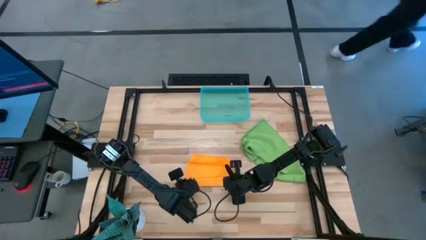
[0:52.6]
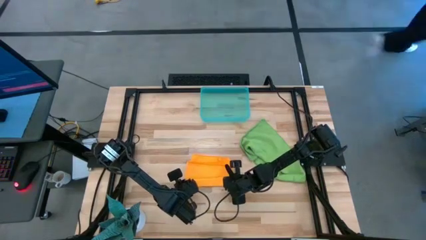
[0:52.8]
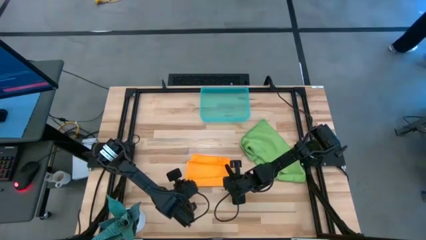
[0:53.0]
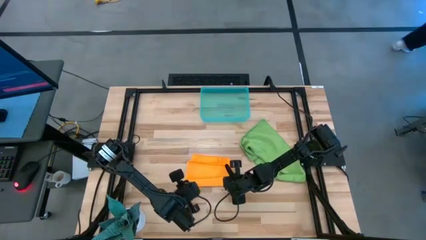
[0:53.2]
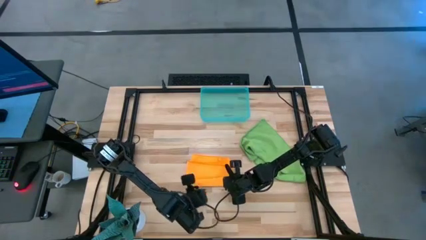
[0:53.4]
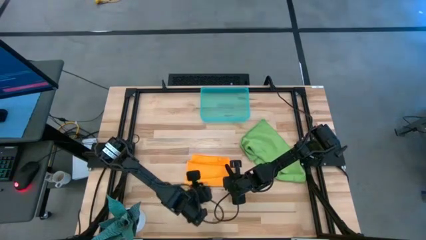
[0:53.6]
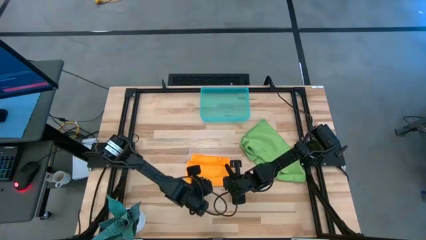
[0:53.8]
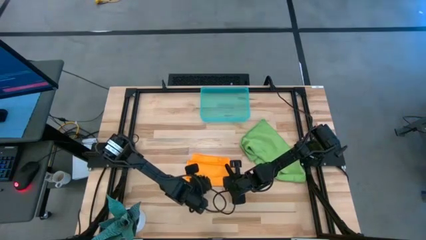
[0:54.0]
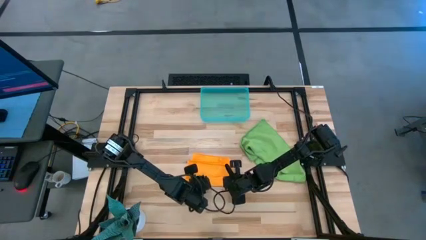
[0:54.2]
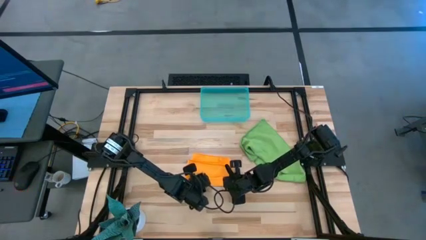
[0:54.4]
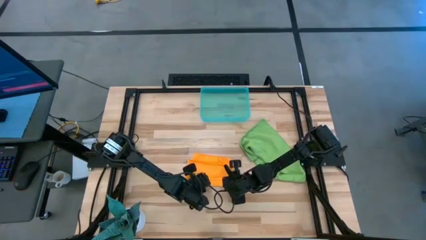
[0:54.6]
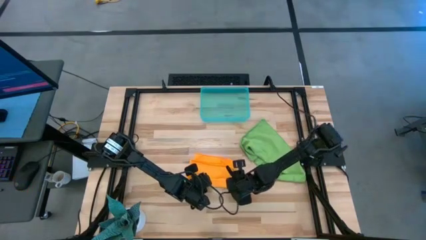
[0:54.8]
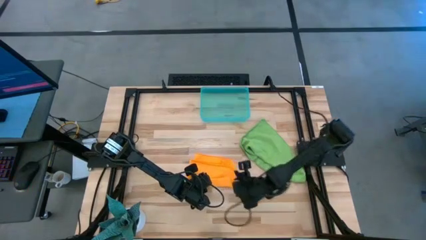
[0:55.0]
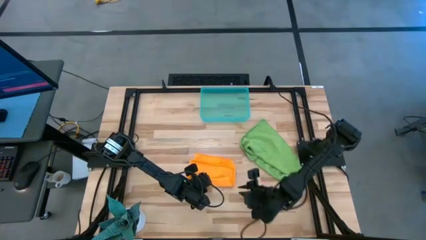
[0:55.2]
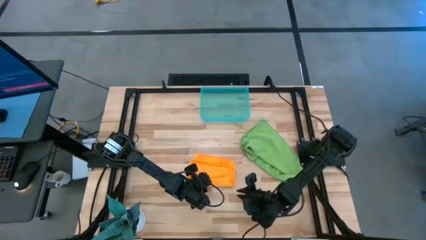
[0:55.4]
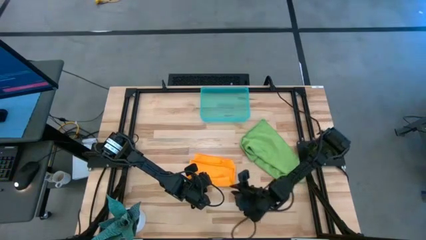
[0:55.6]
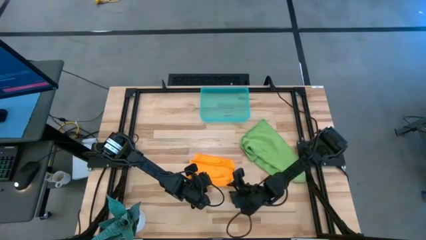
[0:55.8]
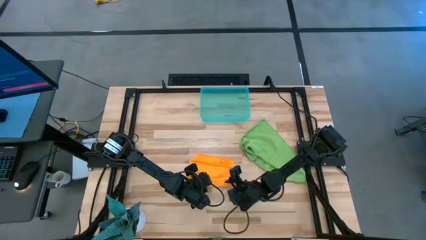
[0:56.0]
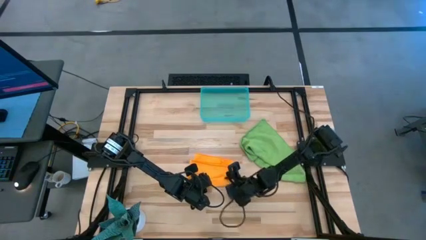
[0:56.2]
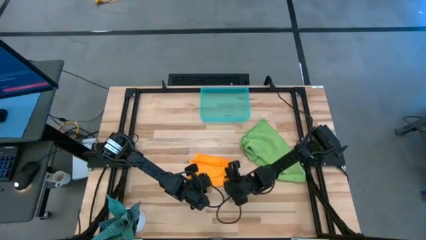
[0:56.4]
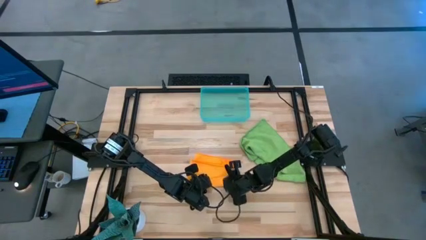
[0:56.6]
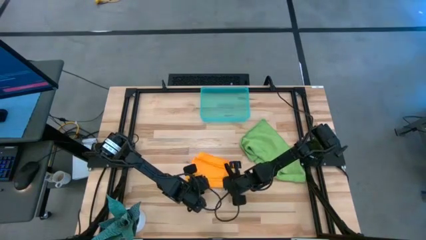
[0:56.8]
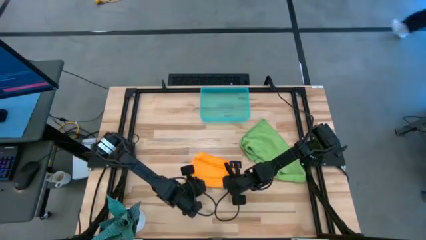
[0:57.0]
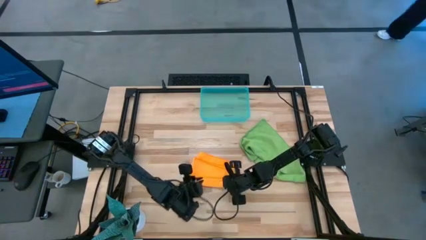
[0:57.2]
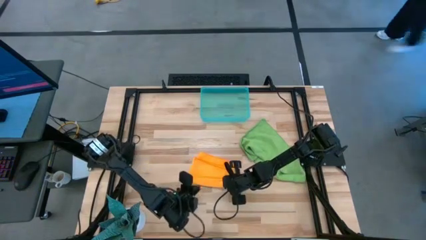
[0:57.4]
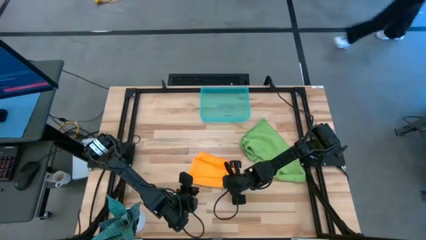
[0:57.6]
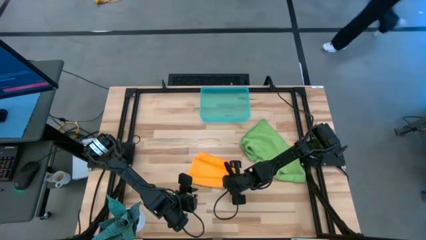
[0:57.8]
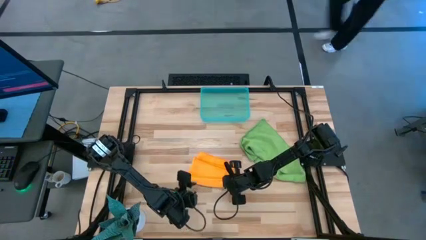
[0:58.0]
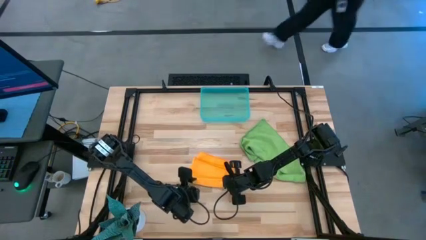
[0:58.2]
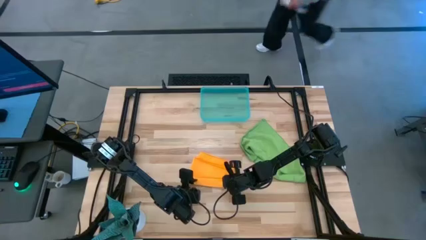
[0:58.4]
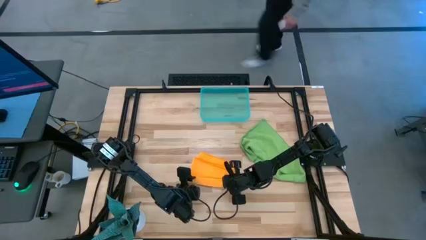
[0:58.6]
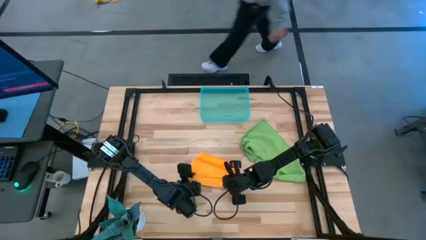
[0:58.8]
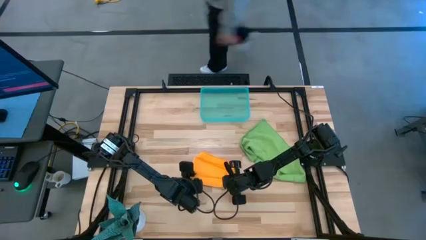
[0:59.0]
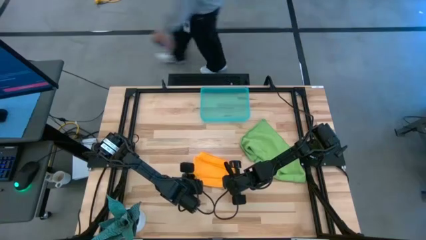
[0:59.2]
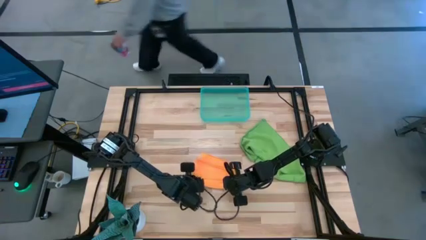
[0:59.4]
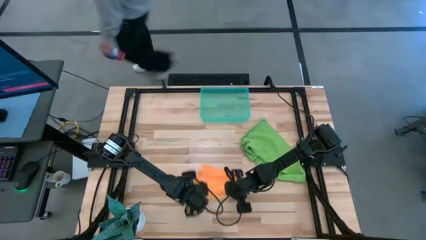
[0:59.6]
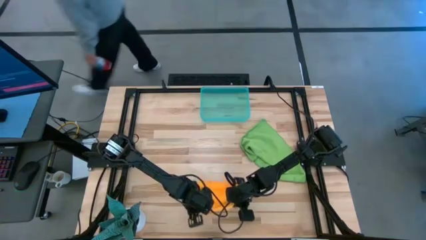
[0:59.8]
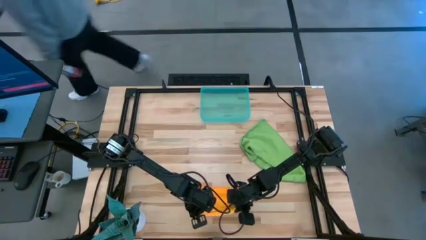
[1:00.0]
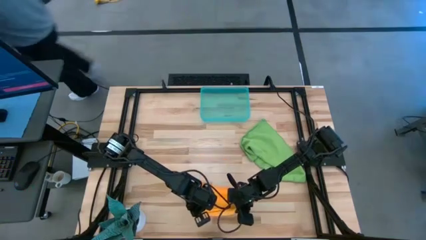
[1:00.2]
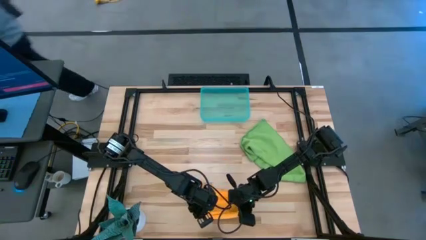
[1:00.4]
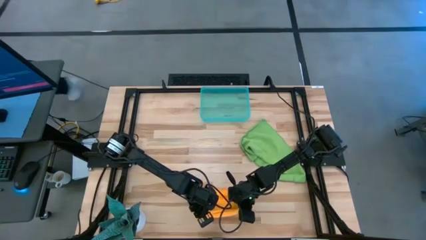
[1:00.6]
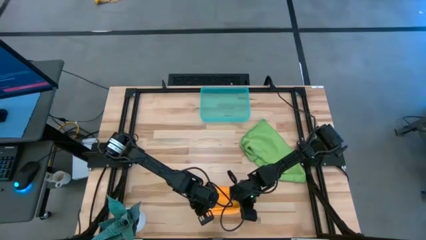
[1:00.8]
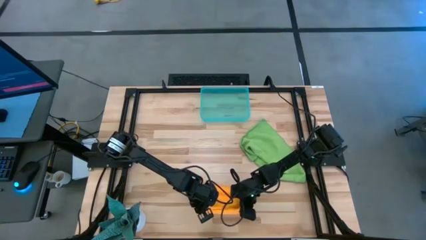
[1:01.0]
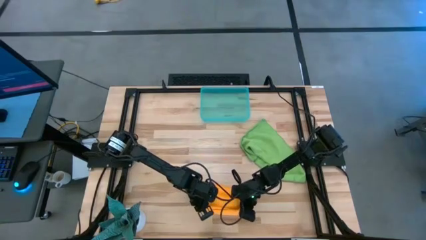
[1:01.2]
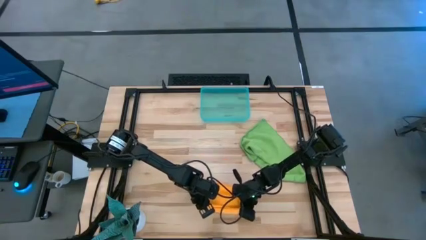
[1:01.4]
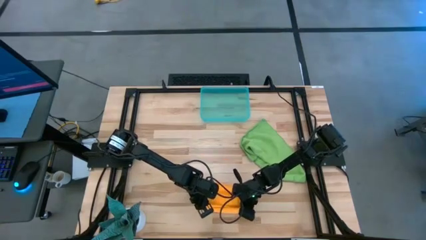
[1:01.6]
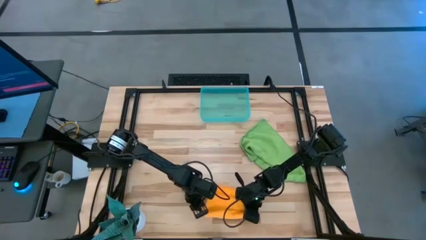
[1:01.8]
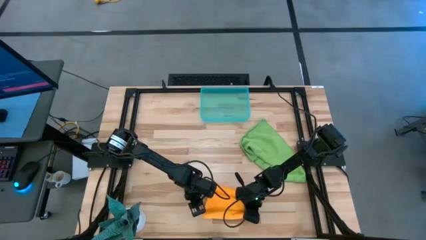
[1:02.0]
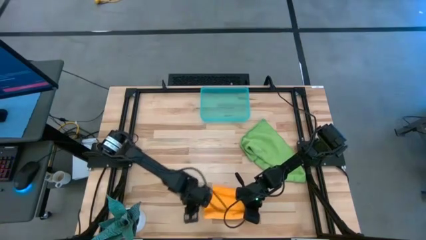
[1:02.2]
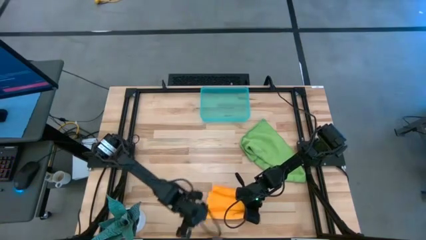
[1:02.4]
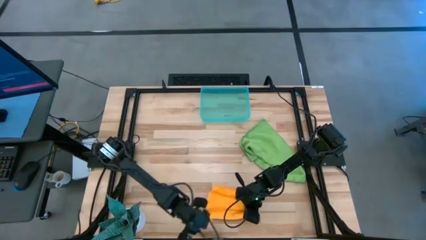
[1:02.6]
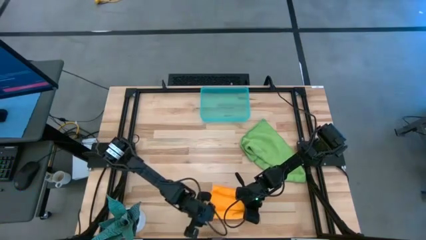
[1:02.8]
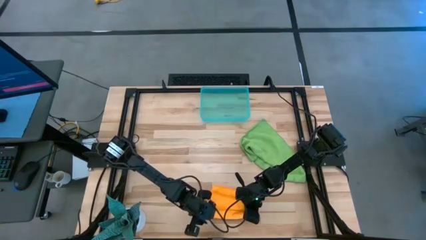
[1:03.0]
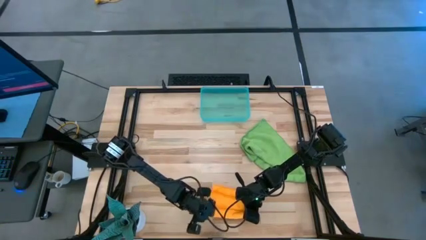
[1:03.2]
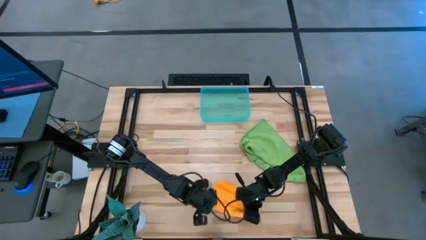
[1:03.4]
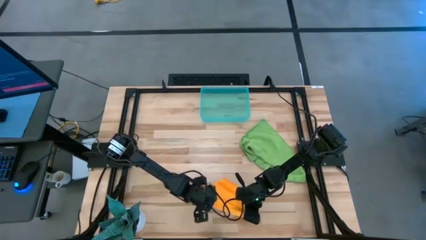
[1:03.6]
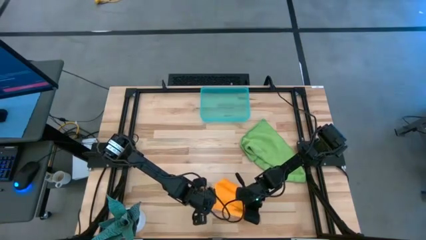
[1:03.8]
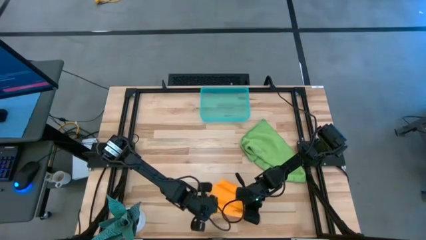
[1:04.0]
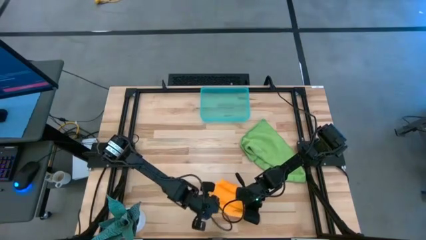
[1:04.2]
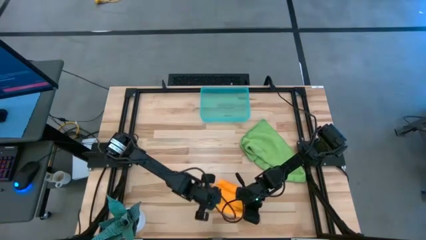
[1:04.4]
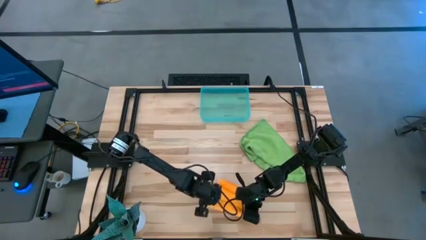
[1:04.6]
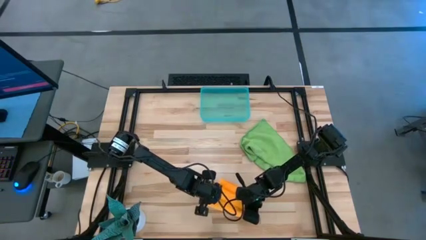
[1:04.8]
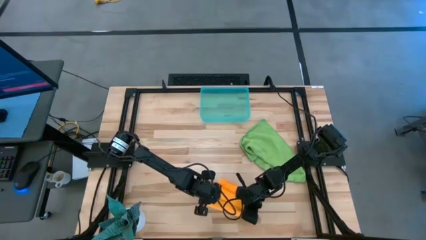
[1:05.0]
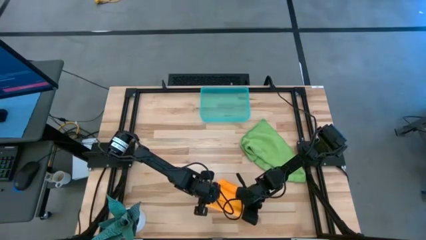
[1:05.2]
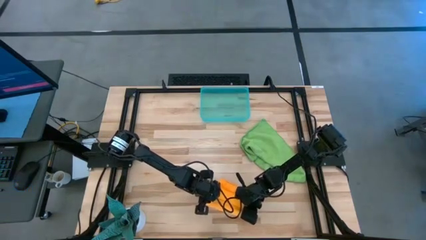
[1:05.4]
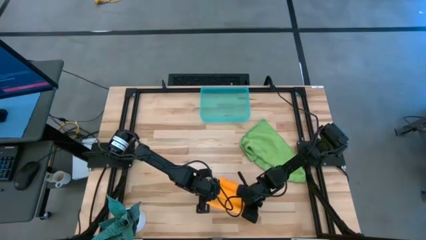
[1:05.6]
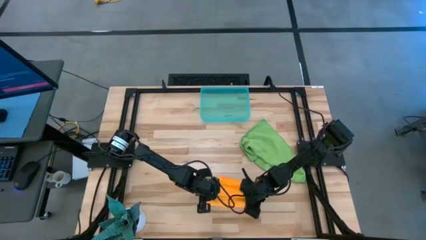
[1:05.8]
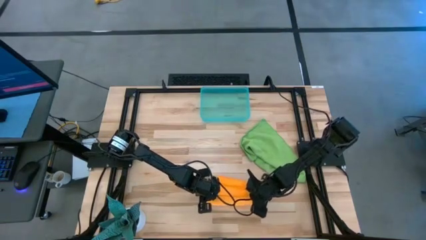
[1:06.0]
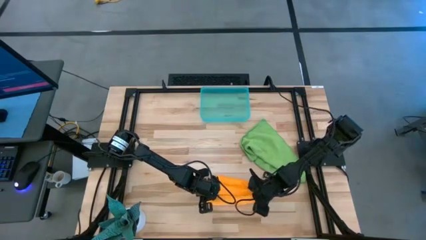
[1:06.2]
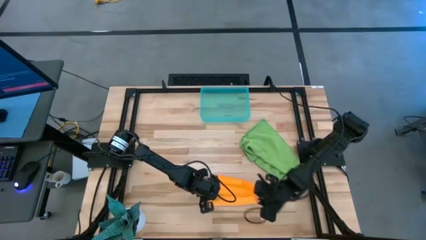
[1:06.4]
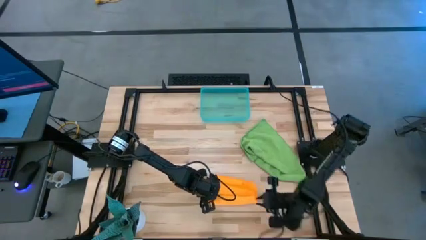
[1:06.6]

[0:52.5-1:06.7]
Task: Roll microfiber towels into tight, uniform cylinder then place into a basket
Roll the orange microfiber towel
